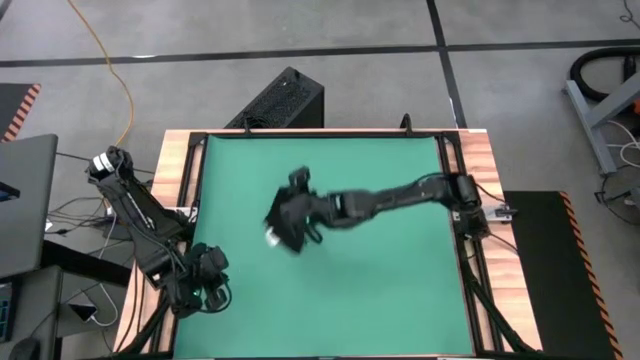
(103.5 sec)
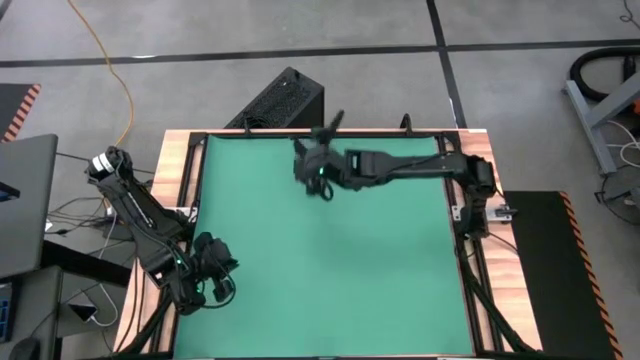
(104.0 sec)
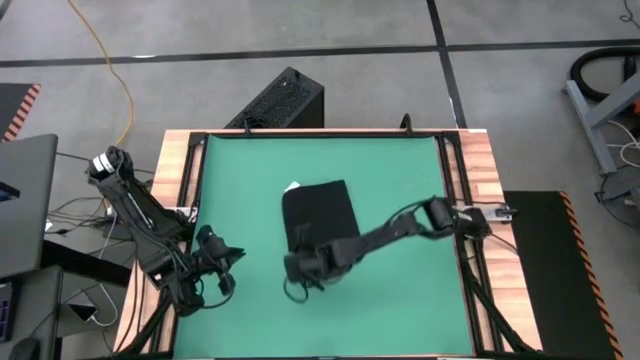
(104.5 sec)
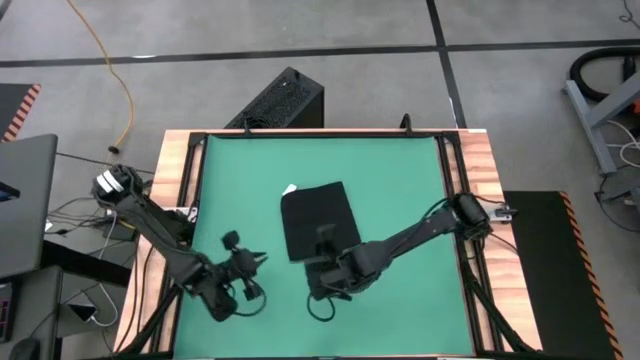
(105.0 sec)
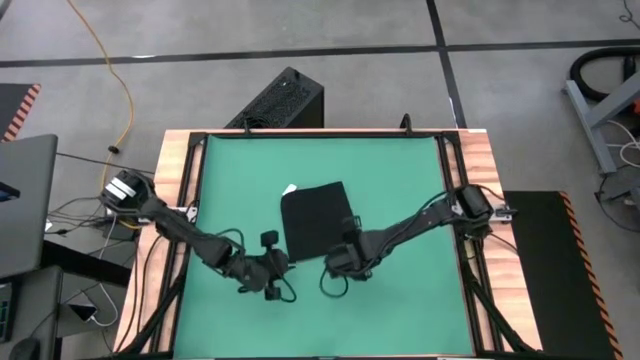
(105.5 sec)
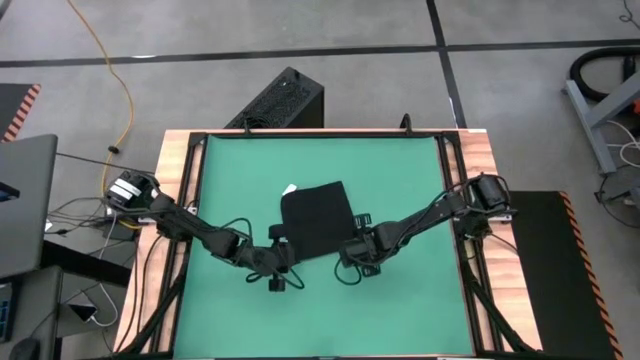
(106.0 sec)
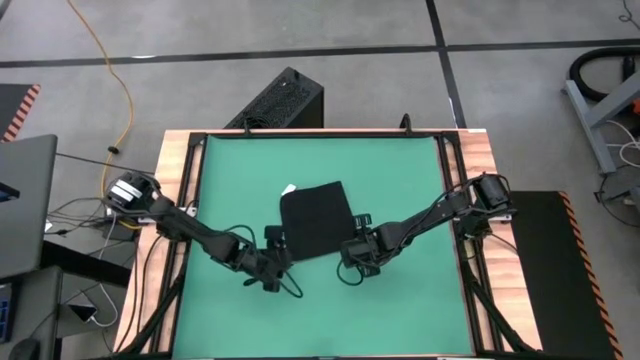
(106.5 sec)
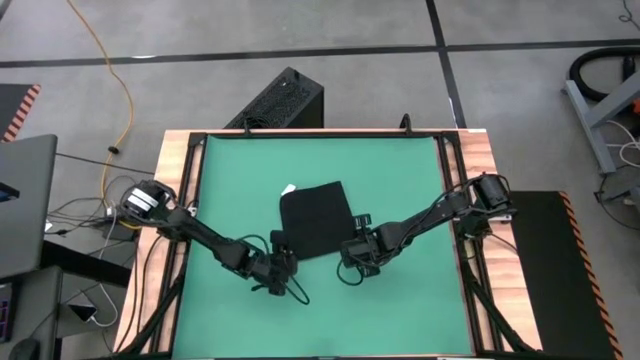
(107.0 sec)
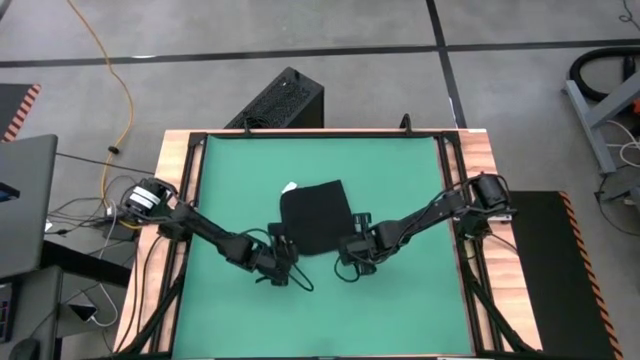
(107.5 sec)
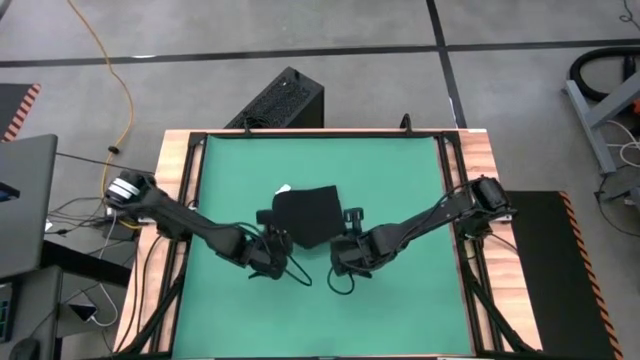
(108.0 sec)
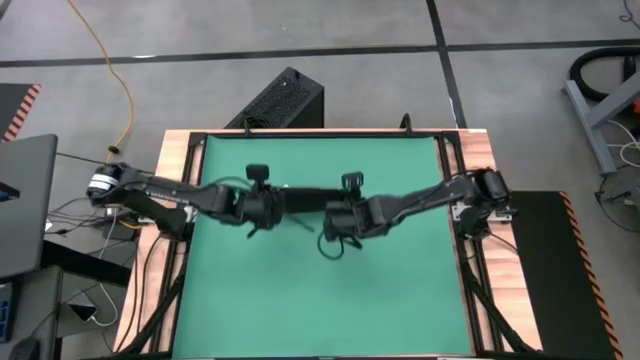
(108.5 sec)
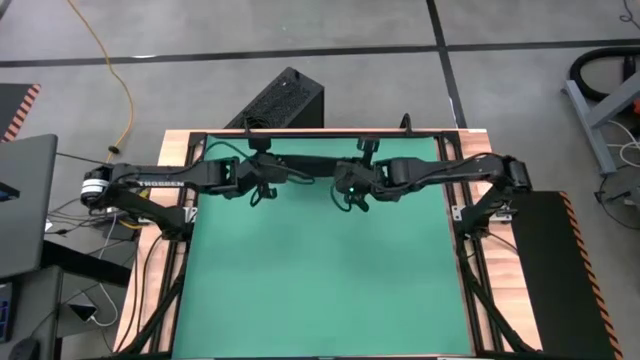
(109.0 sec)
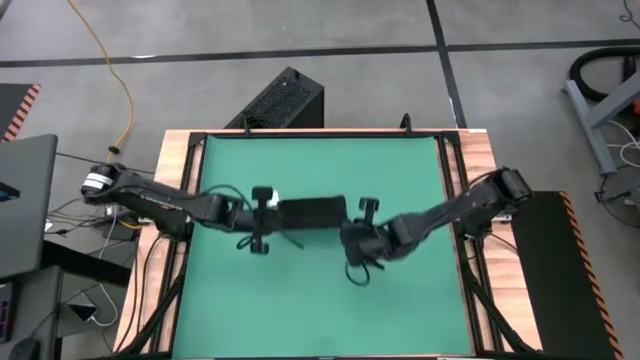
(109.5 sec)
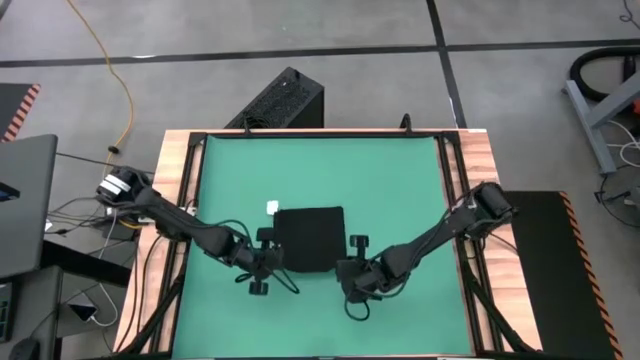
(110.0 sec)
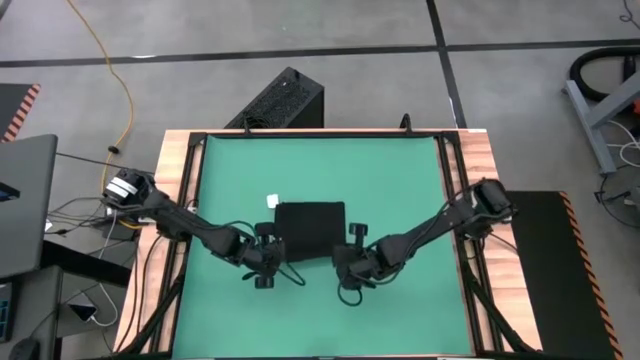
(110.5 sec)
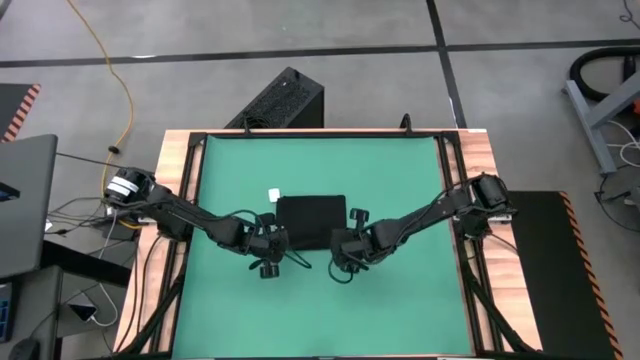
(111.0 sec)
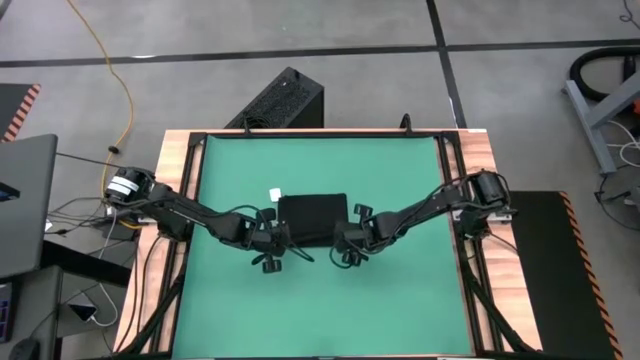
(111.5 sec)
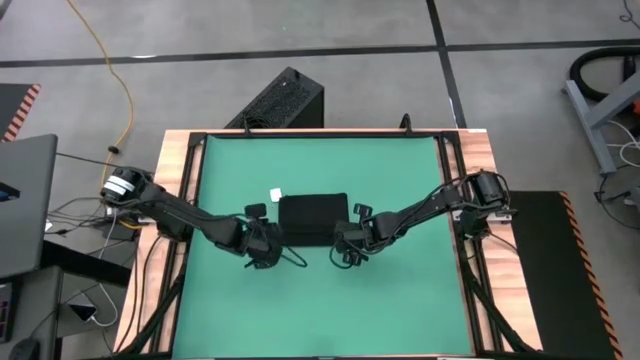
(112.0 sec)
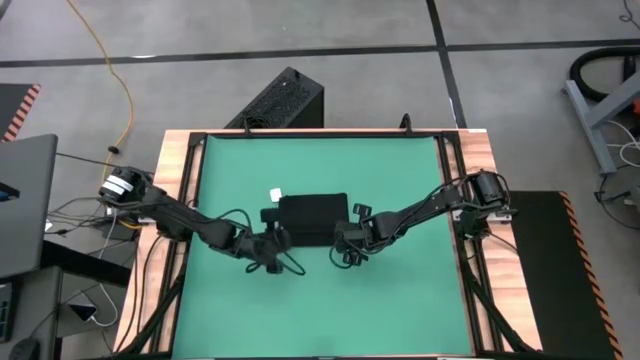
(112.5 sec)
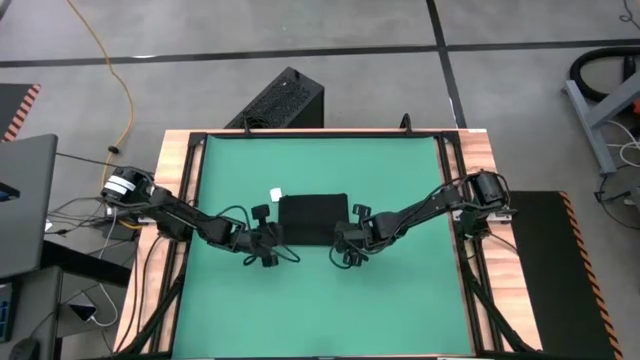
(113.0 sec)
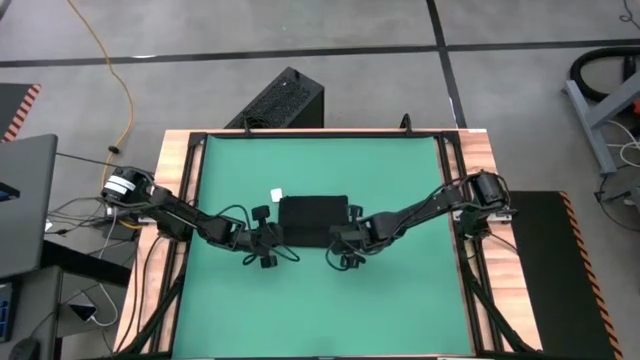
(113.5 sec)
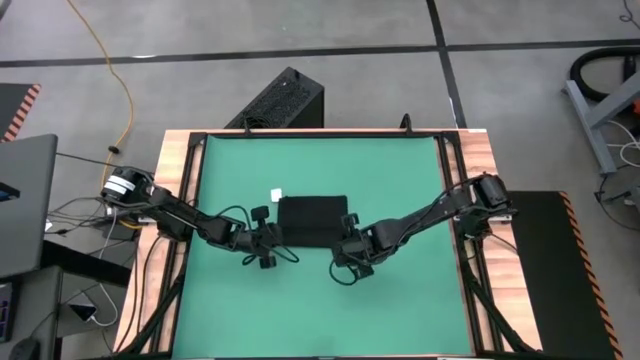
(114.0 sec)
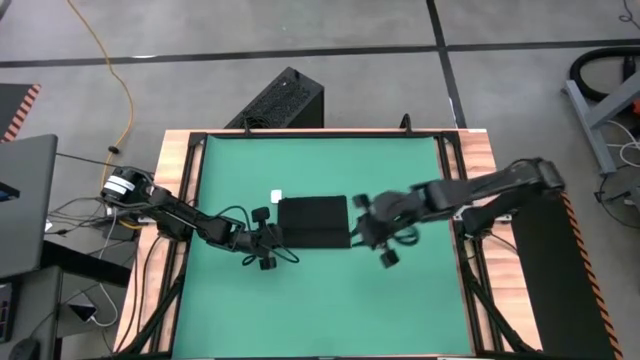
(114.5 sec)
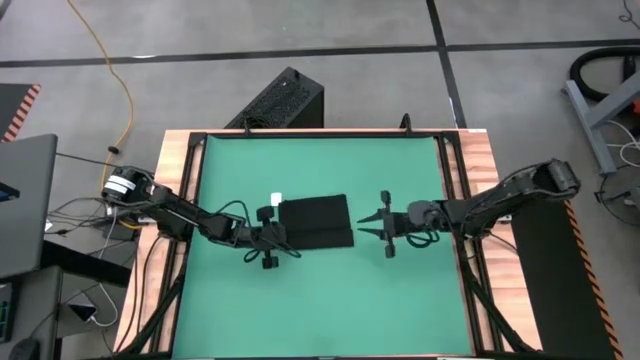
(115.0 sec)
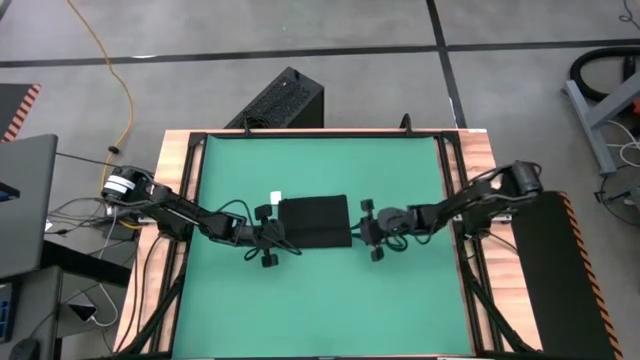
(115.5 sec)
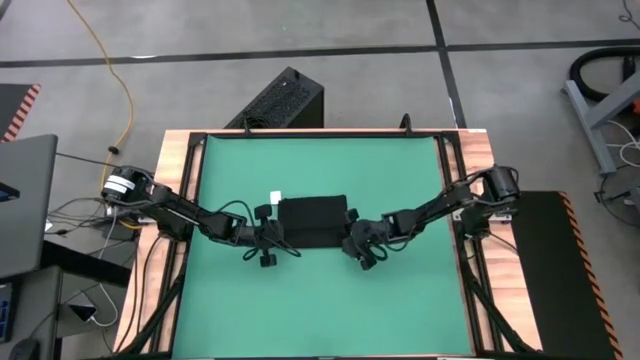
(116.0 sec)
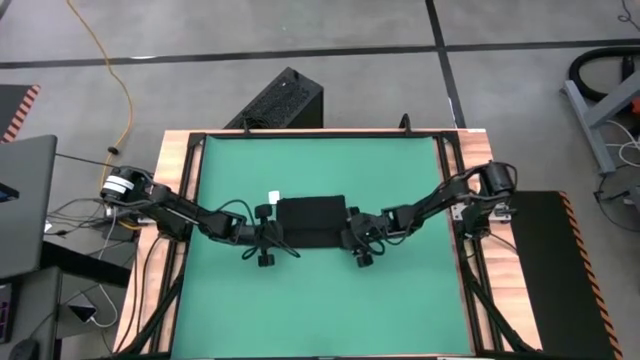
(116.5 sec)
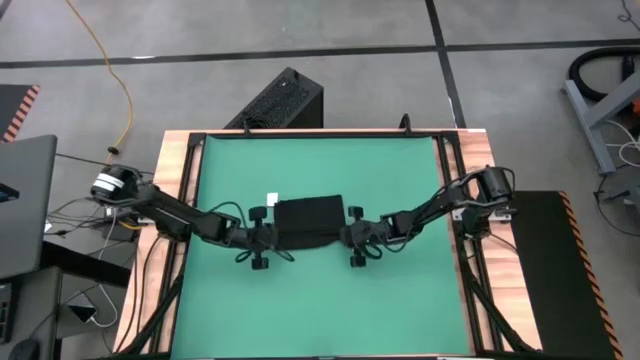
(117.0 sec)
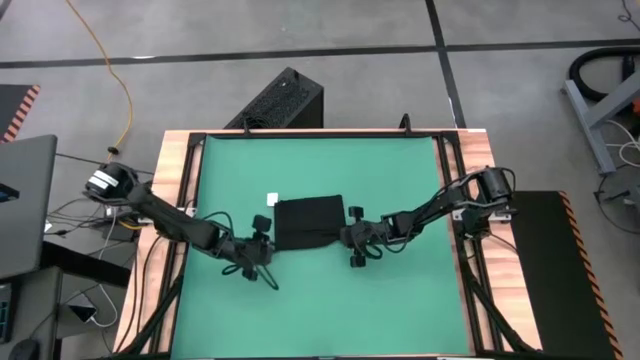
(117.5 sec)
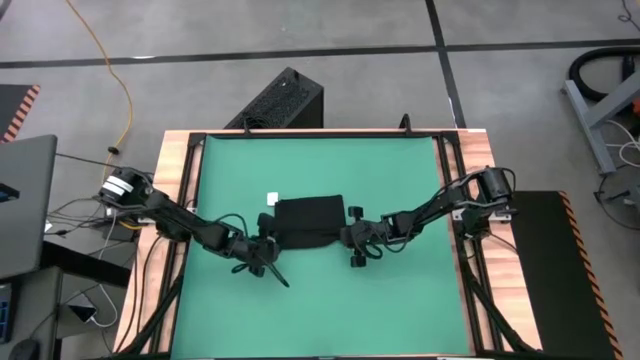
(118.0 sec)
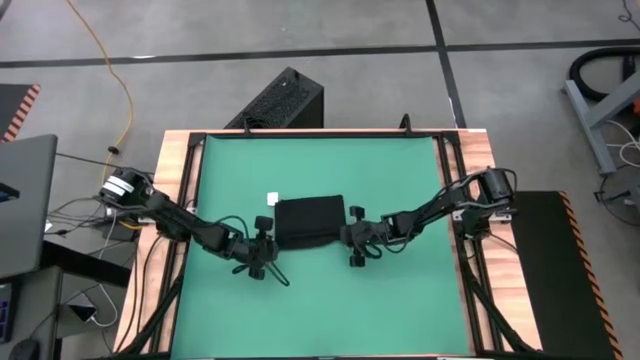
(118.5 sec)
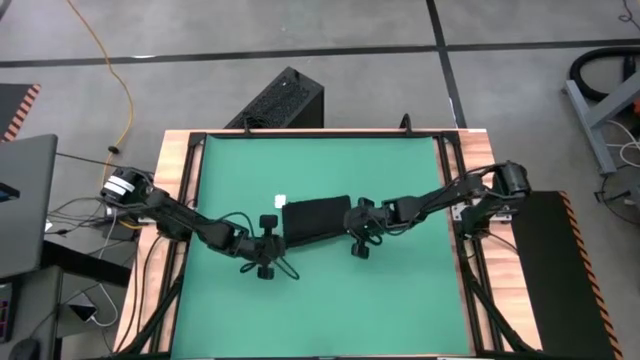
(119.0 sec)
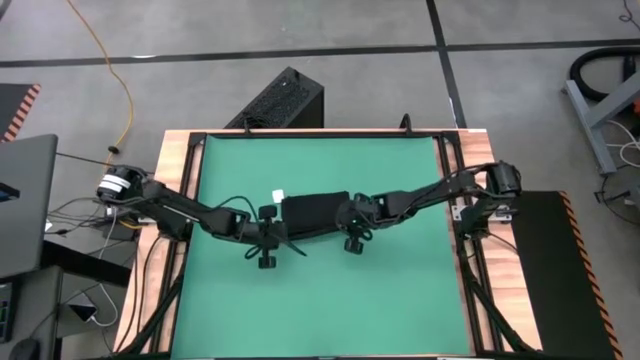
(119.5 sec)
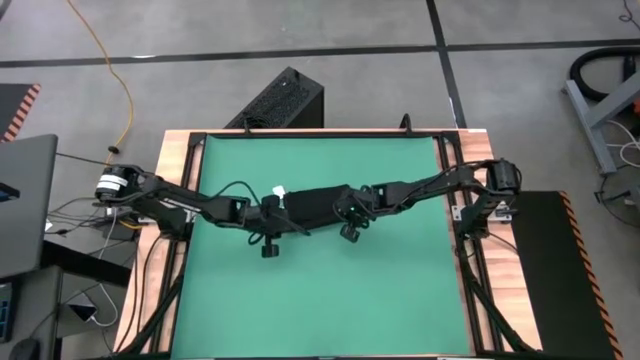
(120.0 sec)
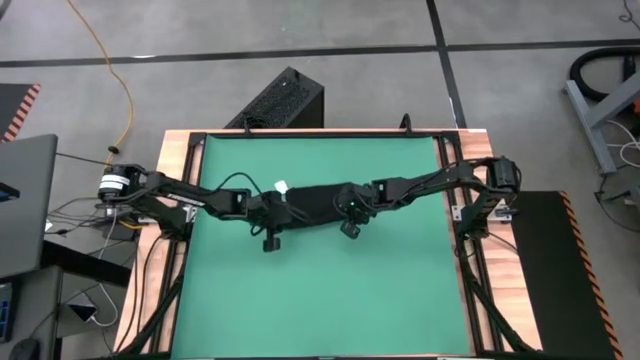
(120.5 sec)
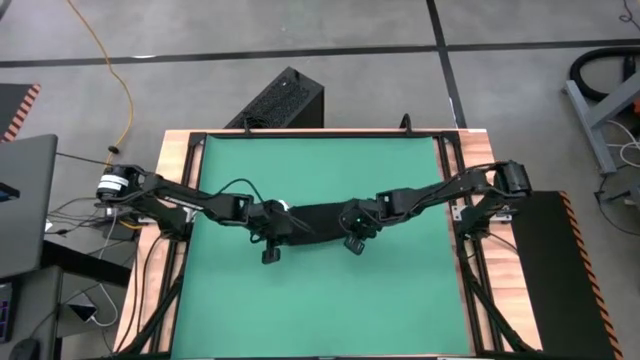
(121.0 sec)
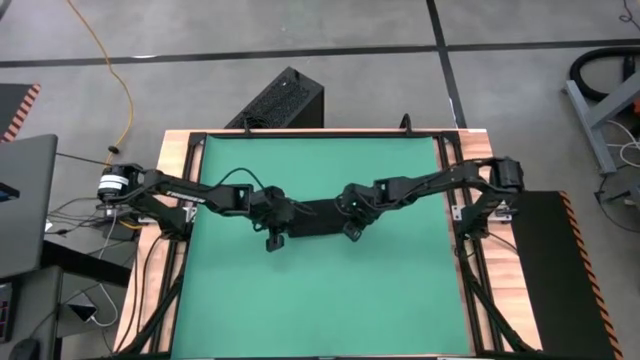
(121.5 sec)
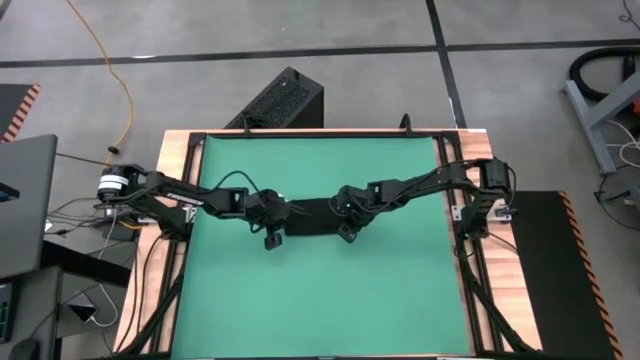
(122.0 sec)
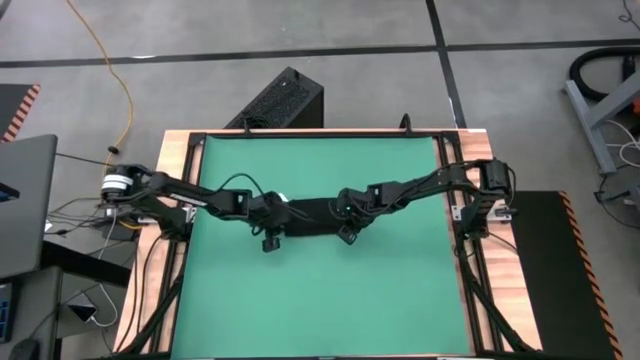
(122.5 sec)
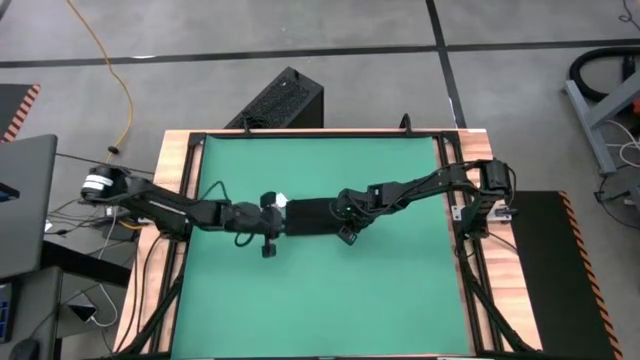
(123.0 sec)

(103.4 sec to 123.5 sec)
Task: Roll towel
Roll the black towel
